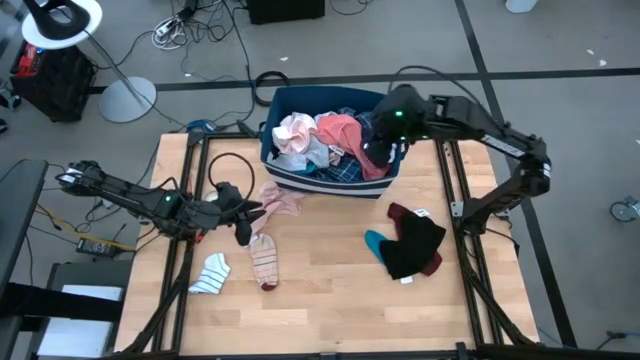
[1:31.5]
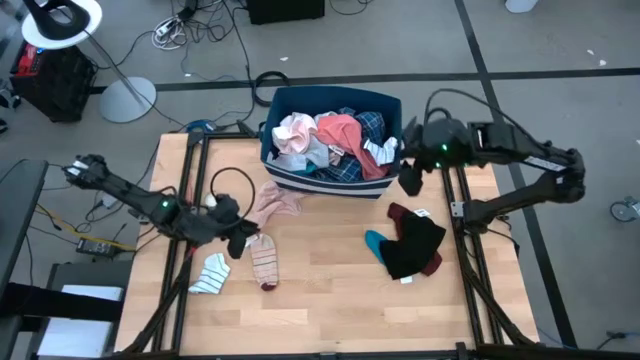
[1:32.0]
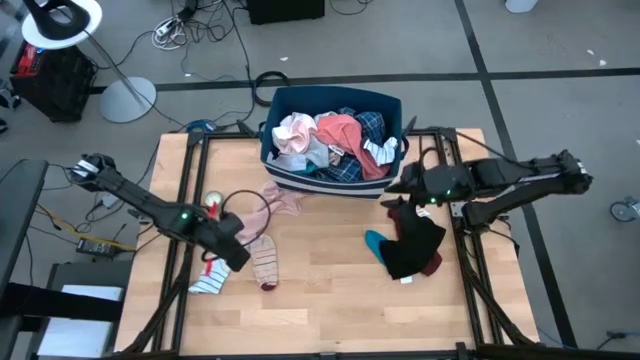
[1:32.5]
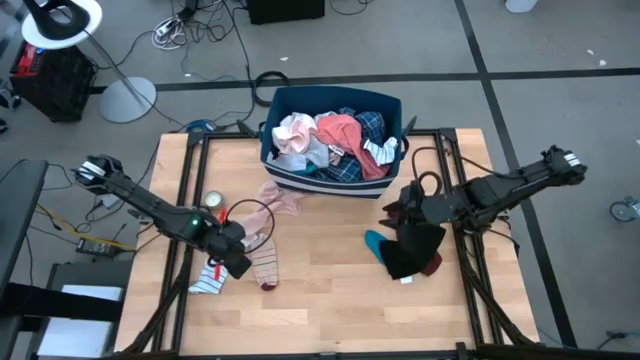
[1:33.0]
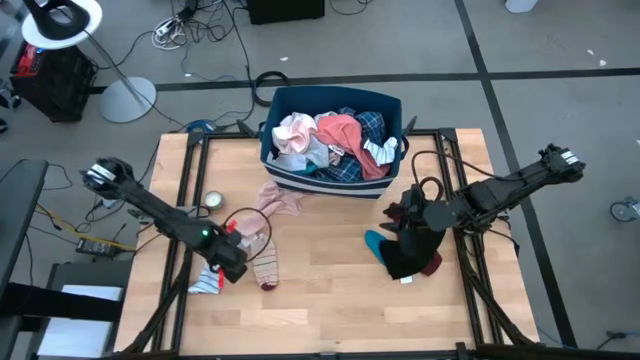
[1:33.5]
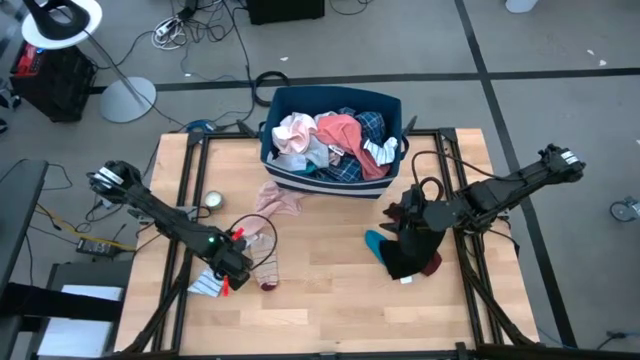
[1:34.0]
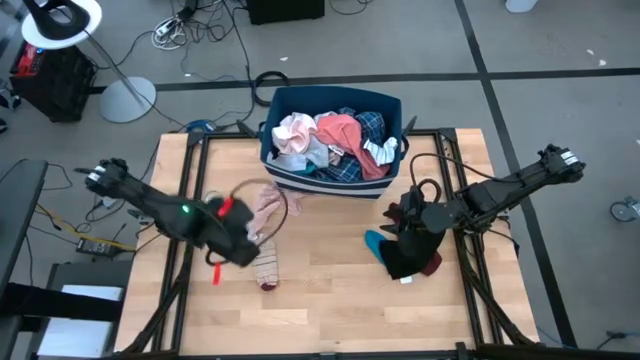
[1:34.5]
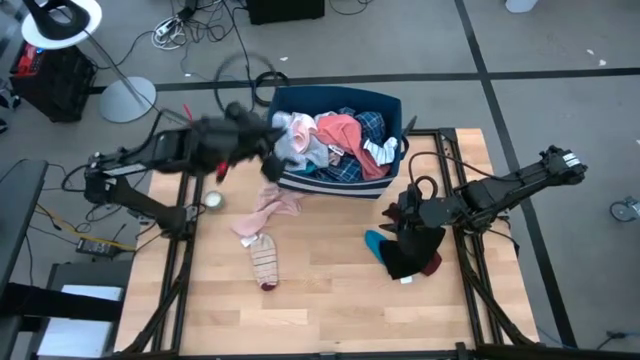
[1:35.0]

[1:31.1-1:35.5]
Task: Sort clothes
Put the striped white sock into the bin

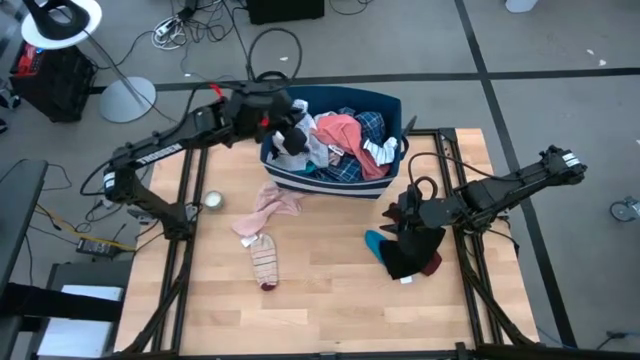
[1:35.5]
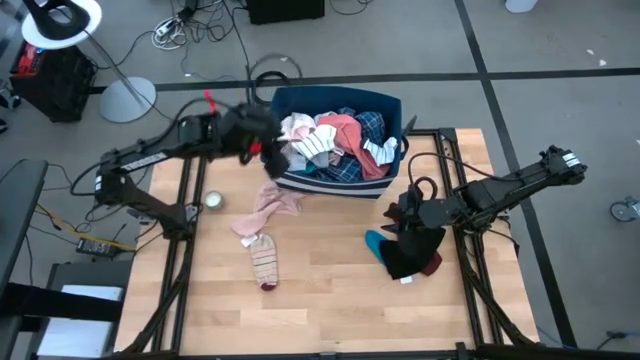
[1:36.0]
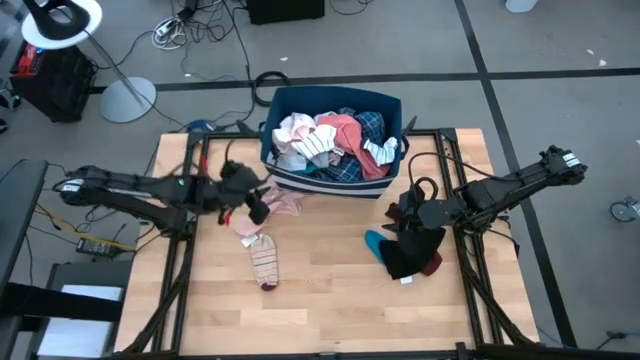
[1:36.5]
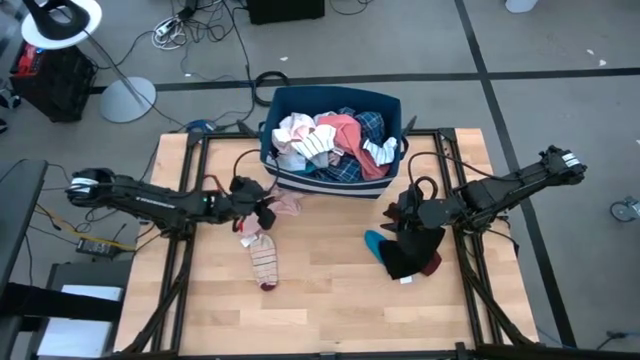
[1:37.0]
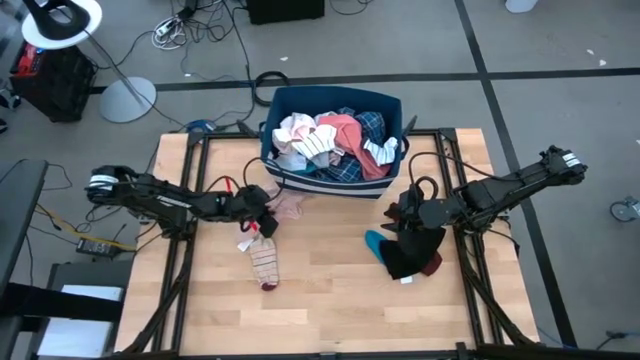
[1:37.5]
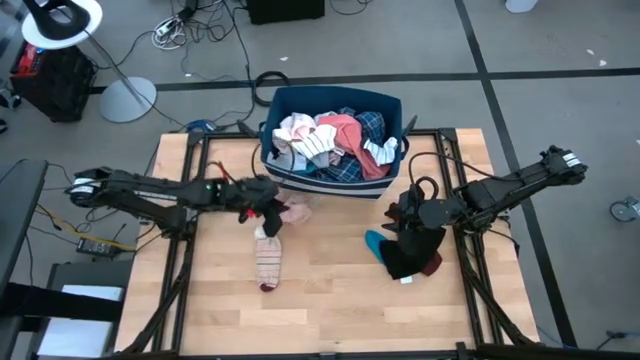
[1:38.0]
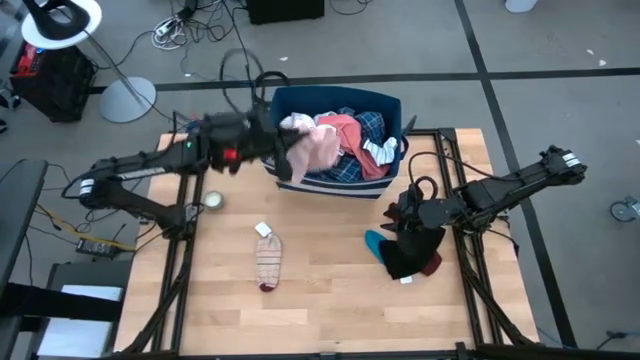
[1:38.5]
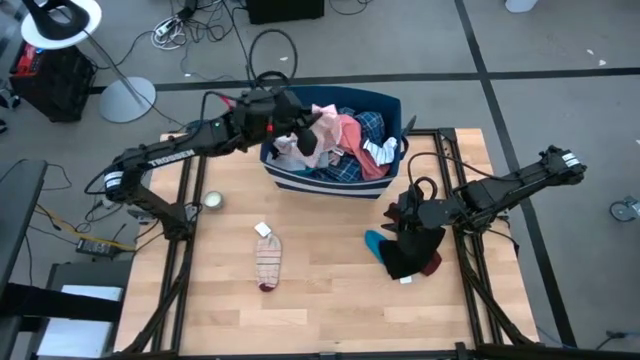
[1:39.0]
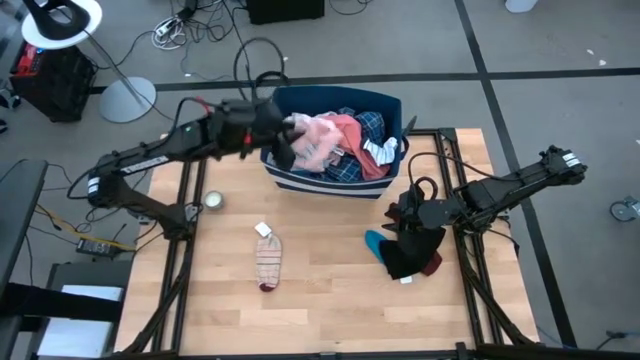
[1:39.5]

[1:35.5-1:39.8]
Put the pink scarf into the blue bin

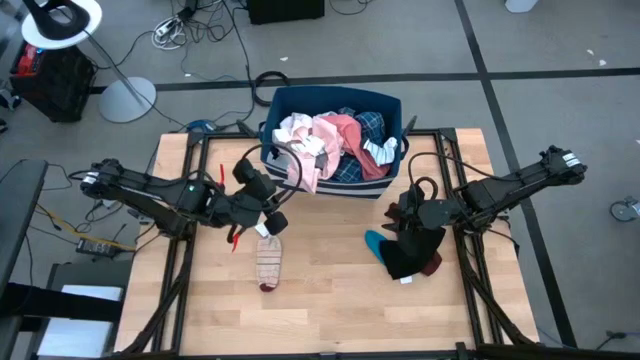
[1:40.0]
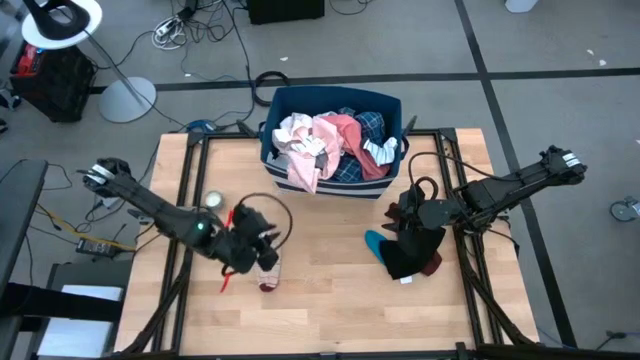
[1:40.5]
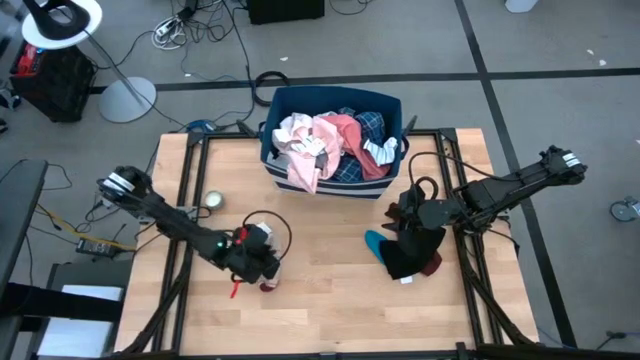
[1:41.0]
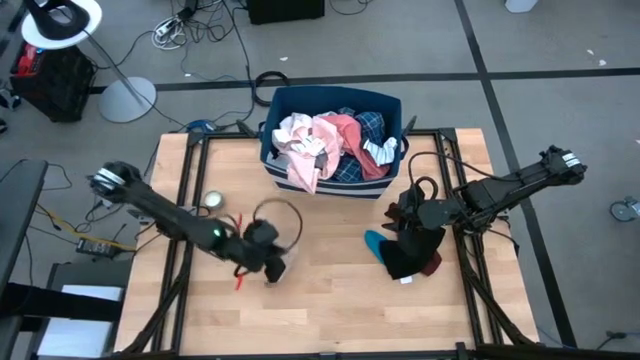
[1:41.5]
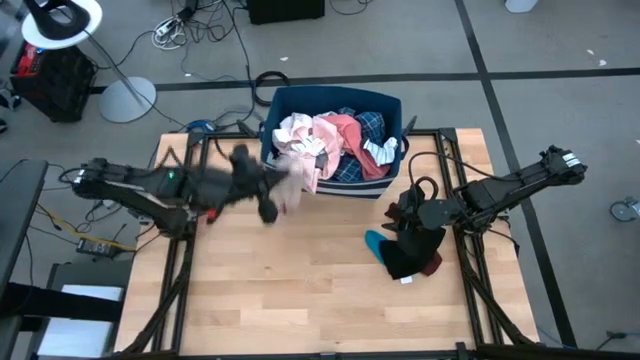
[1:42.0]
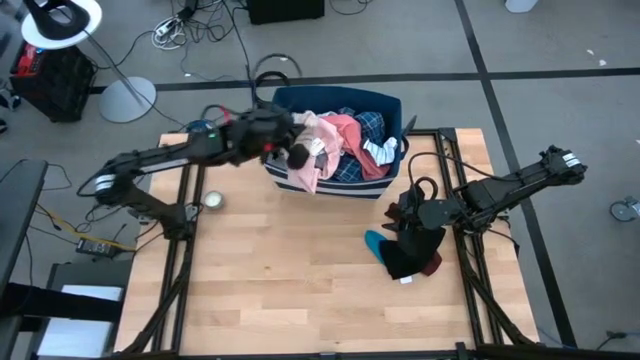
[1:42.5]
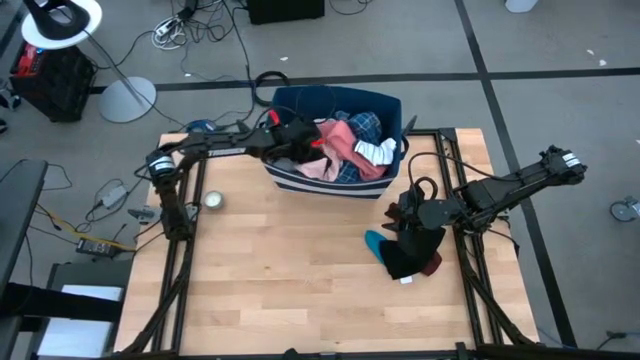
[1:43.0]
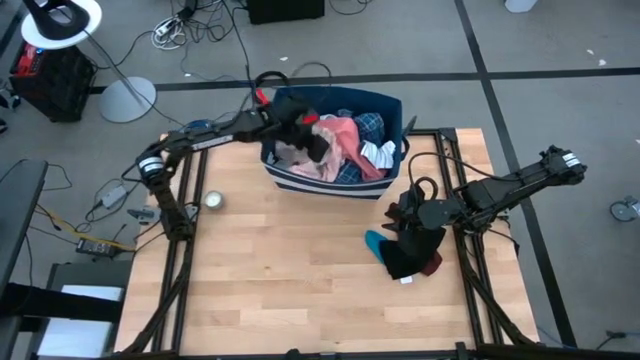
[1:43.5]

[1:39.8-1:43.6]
Put the striped light pink sock into the blue bin

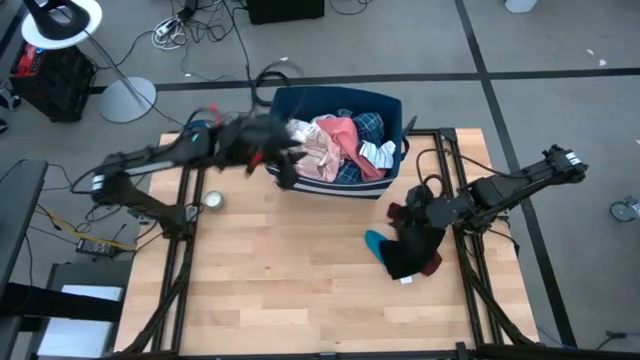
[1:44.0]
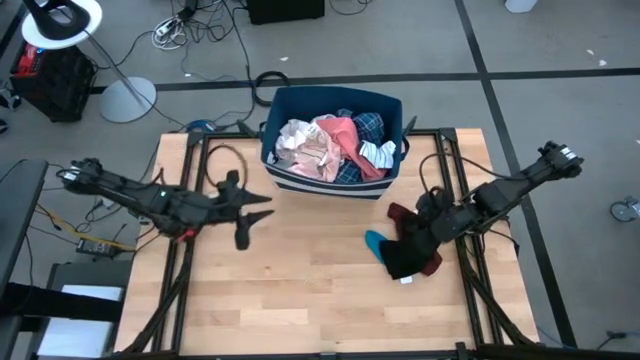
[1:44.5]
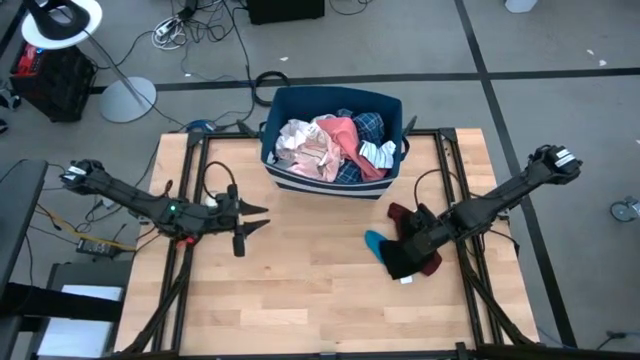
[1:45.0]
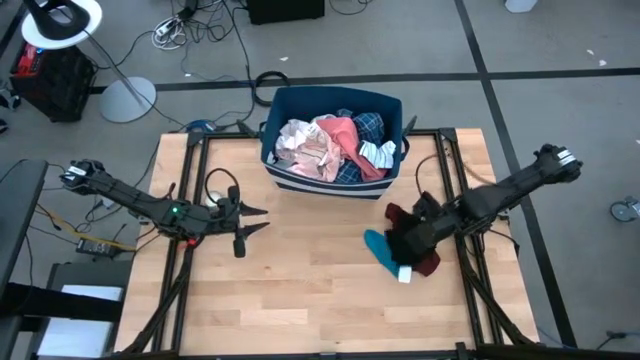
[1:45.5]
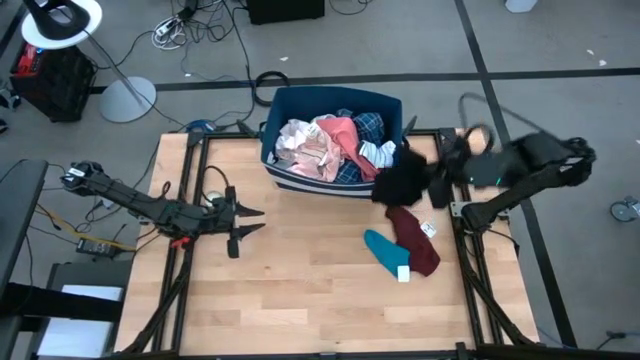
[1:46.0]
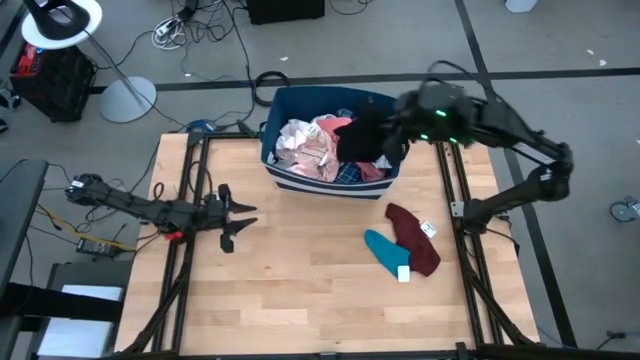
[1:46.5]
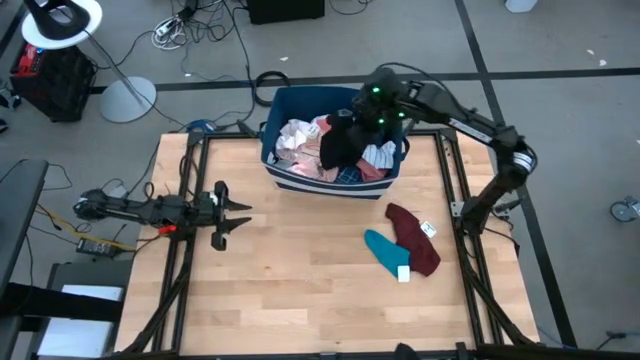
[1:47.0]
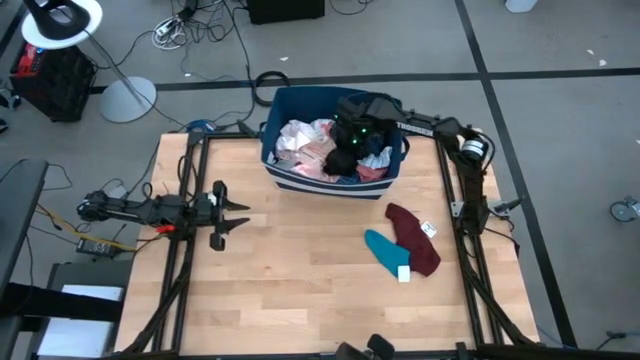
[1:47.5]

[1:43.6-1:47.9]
Put the black boxer into the blue bin

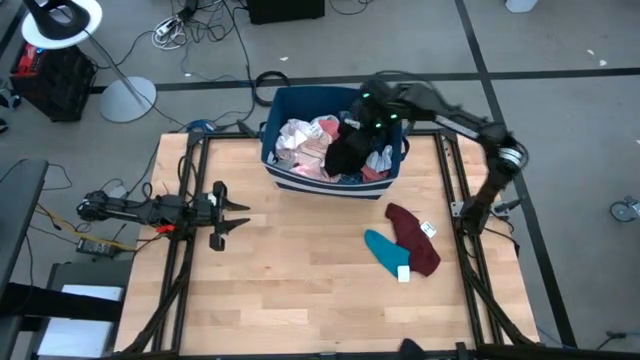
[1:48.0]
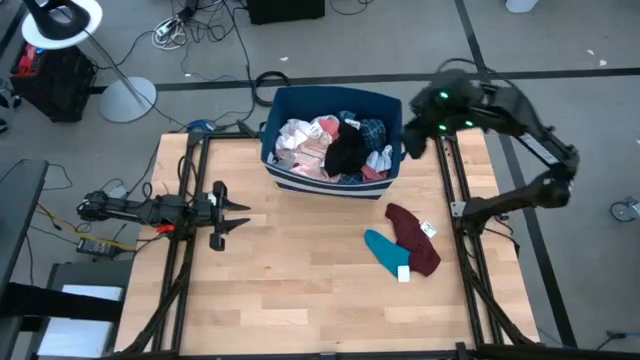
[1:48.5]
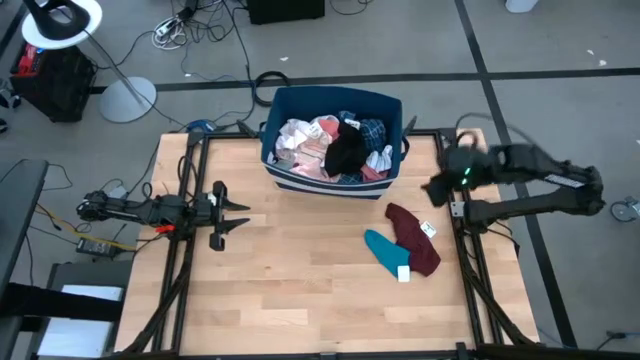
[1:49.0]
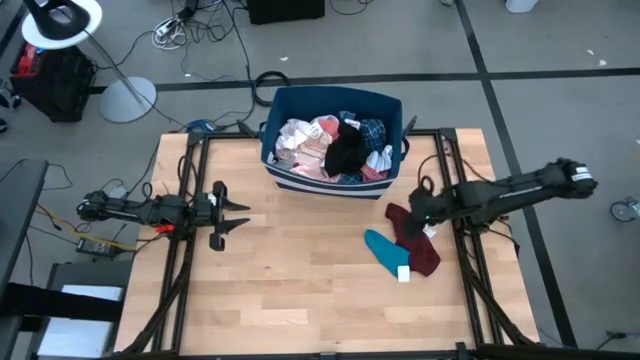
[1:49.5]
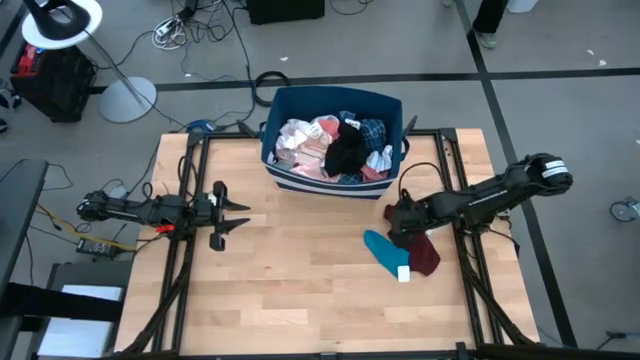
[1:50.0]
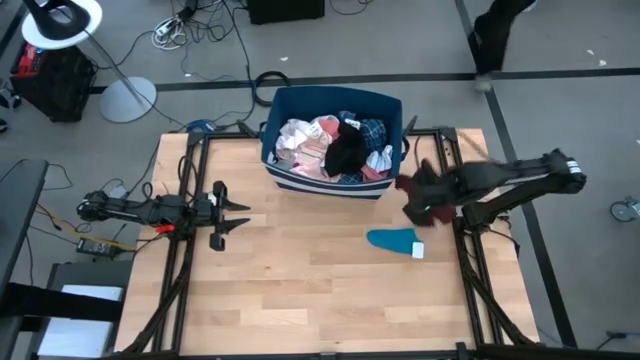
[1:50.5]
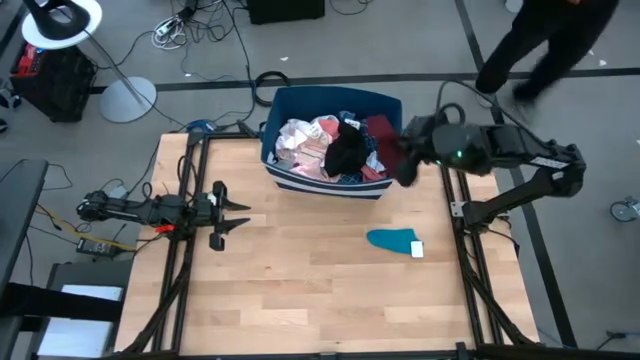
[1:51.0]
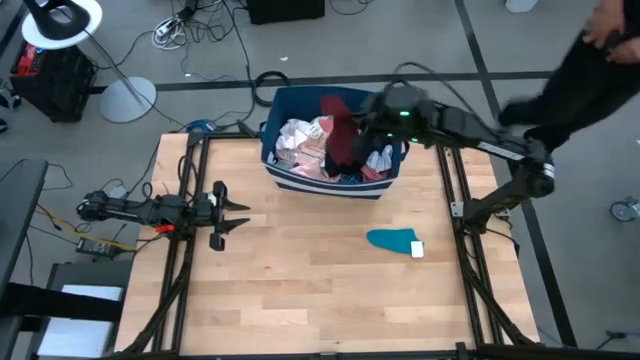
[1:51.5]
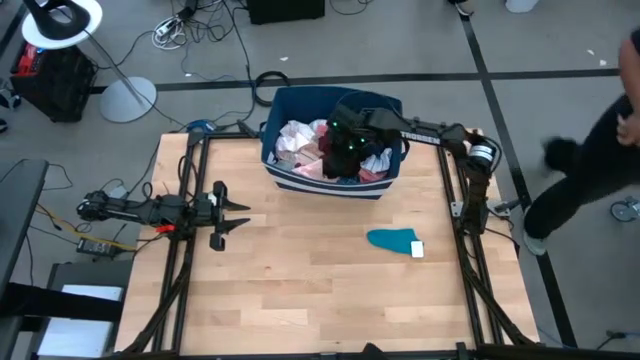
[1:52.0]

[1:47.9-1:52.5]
Put the maroon scarf into the blue bin

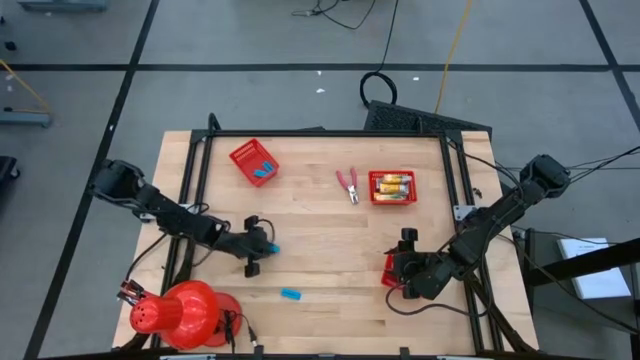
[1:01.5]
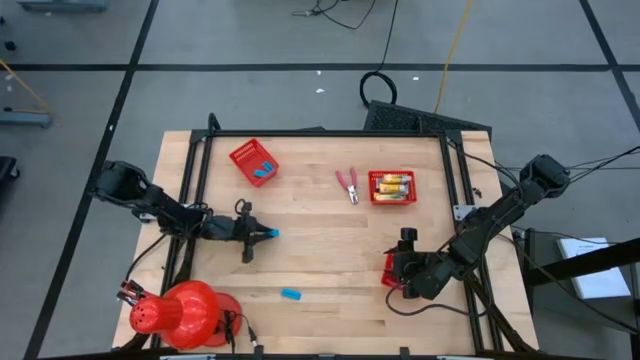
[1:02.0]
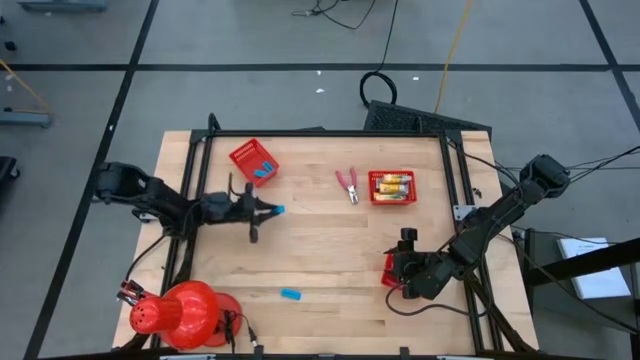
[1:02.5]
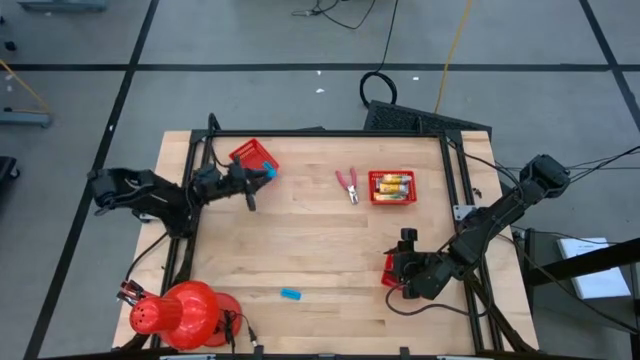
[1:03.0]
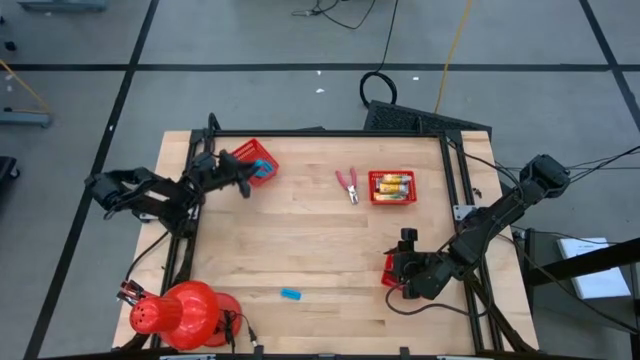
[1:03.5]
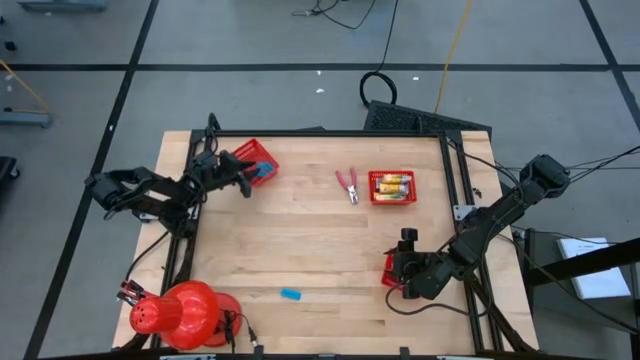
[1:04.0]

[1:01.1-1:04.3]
Task: Pick & Place School Supplies
Put the blue eraser into the top left red bin
